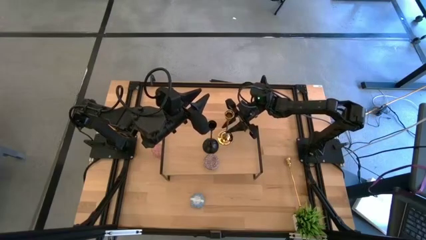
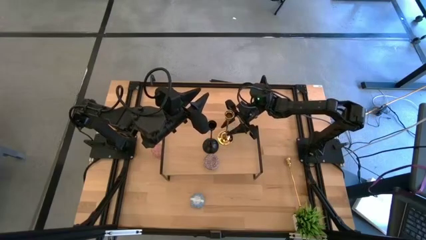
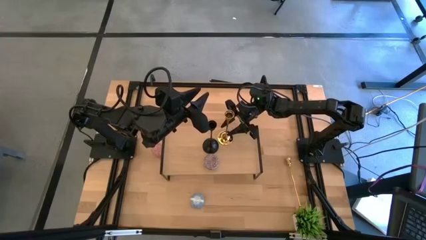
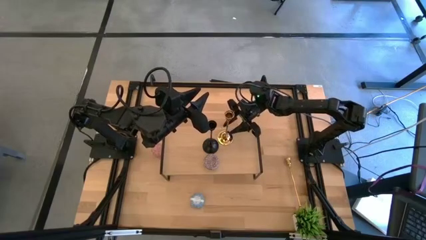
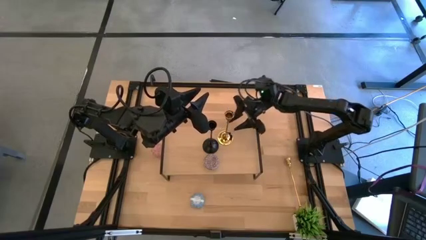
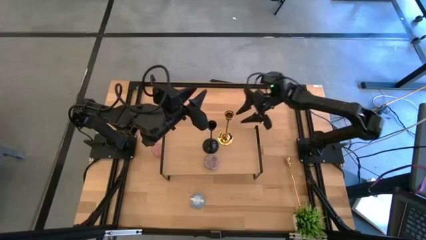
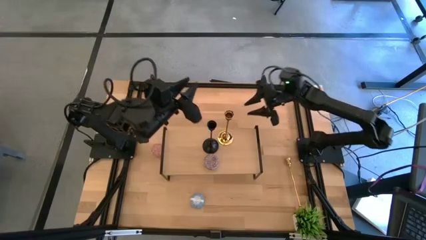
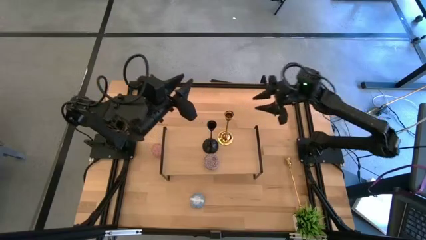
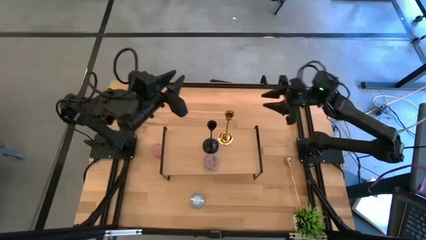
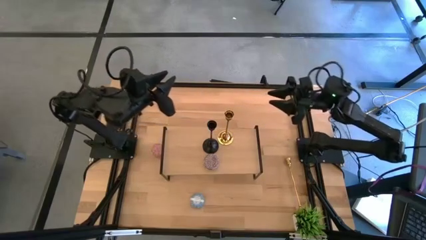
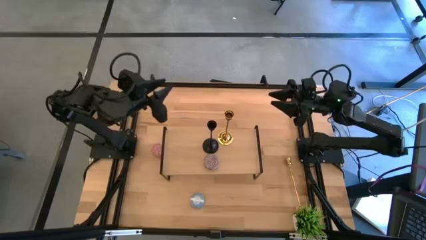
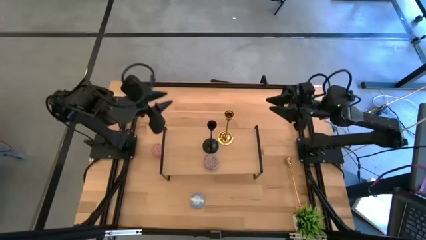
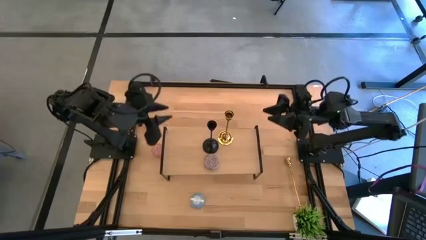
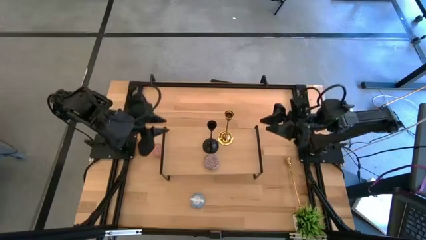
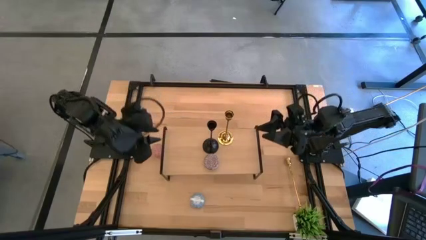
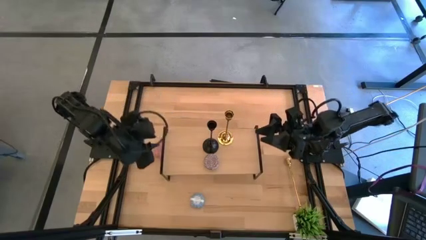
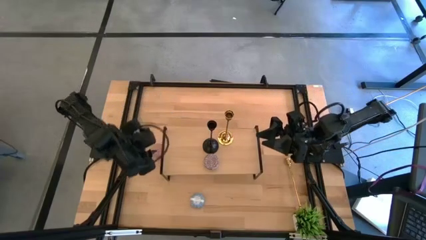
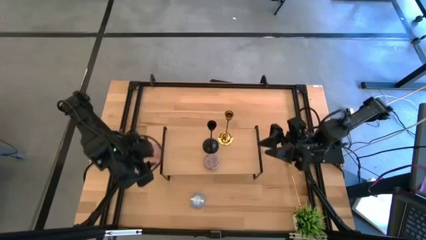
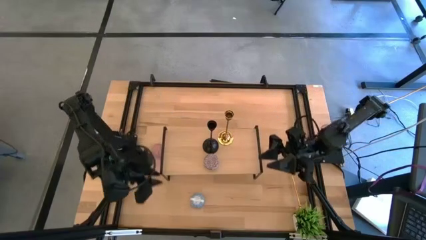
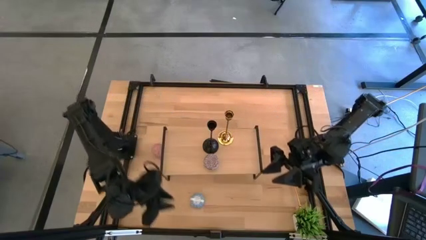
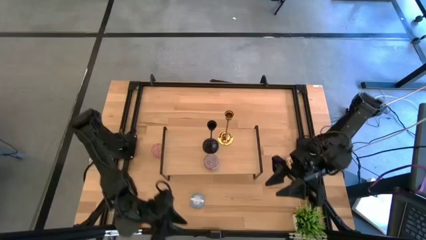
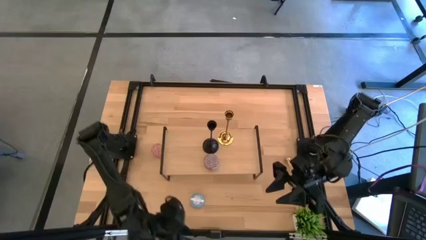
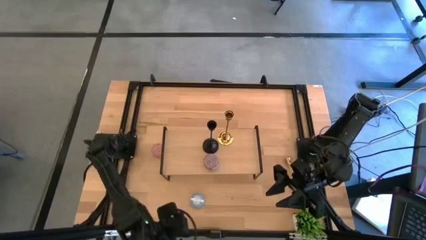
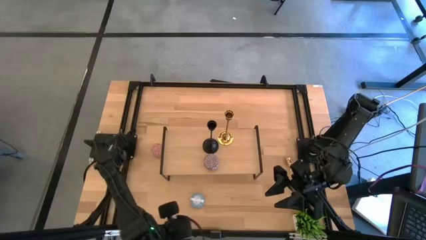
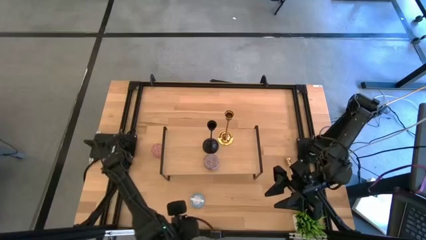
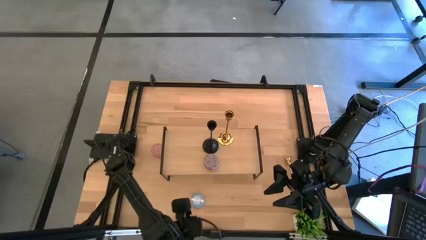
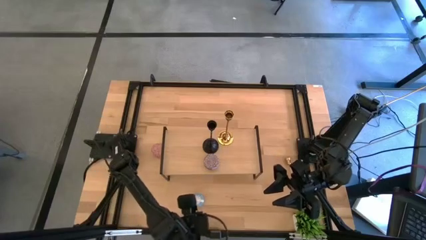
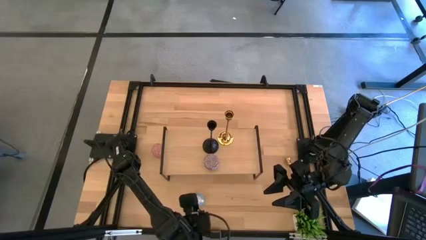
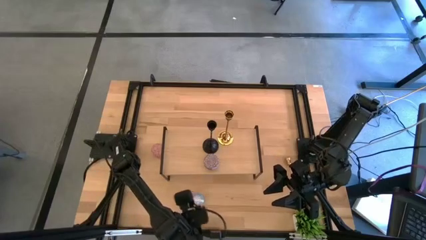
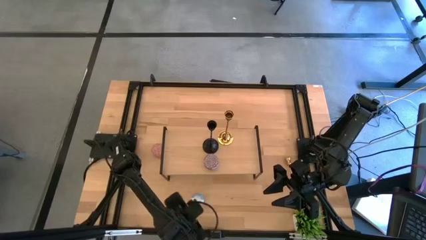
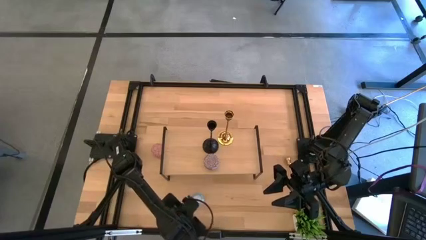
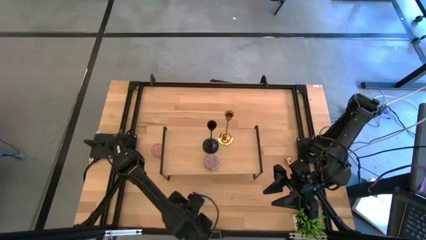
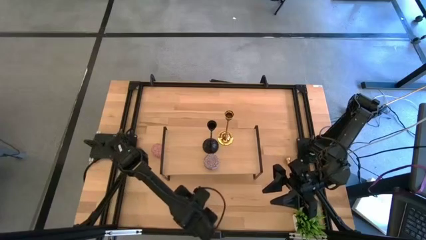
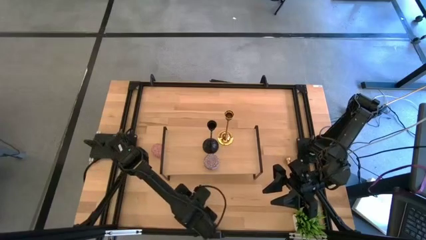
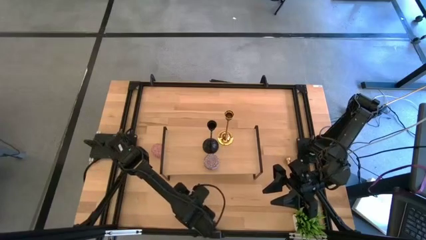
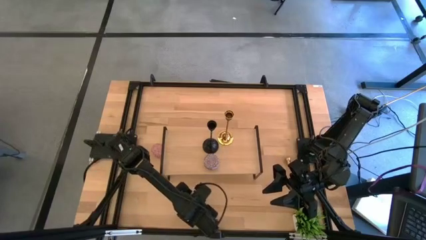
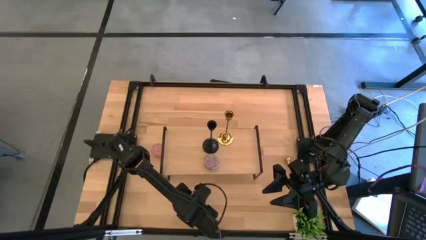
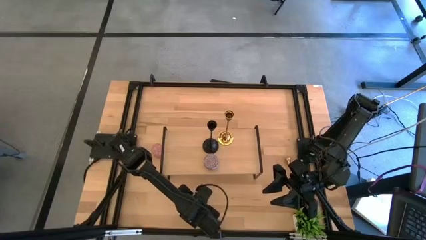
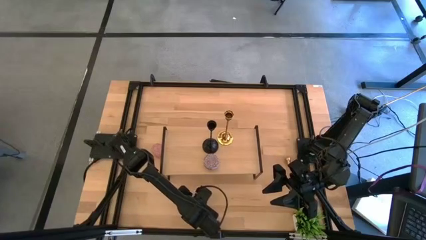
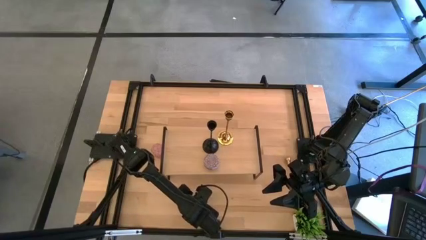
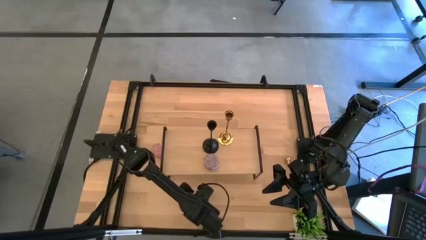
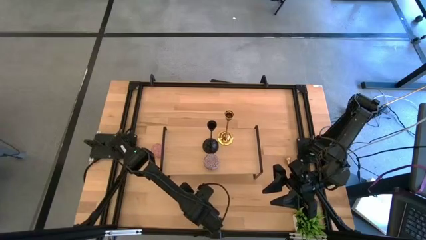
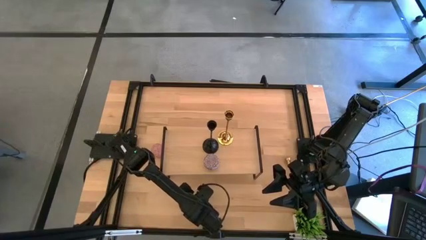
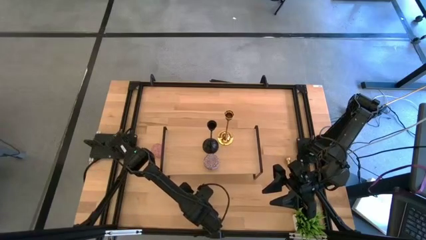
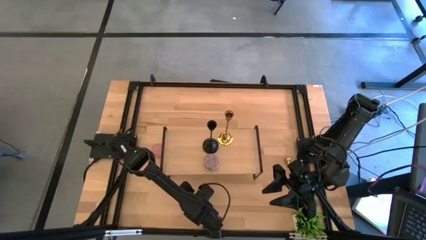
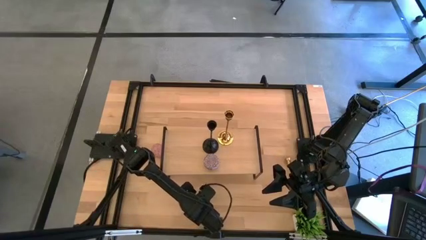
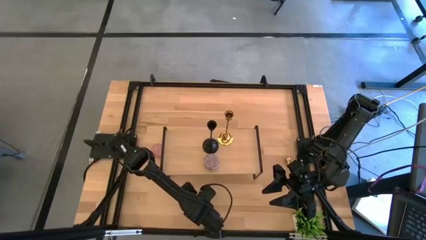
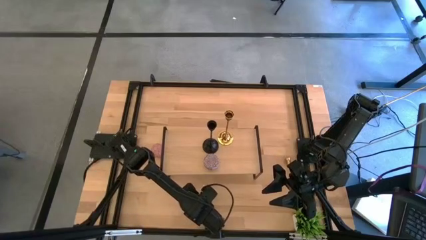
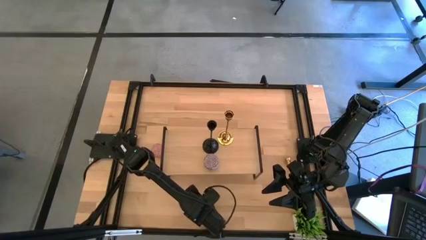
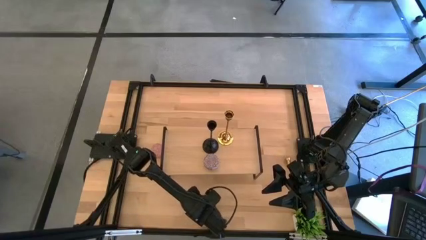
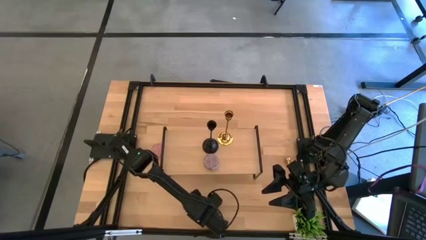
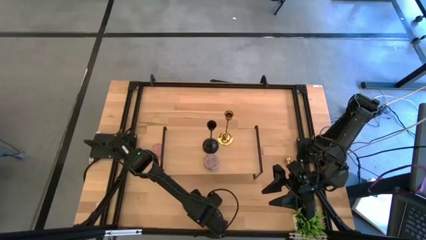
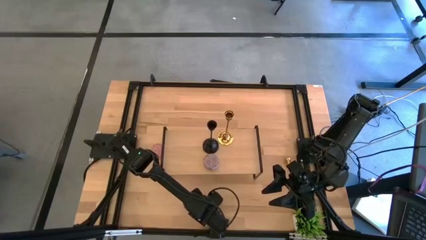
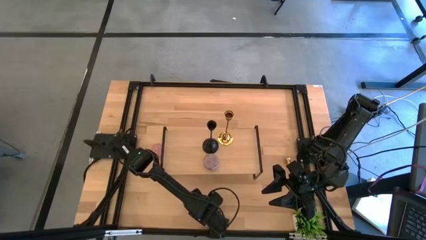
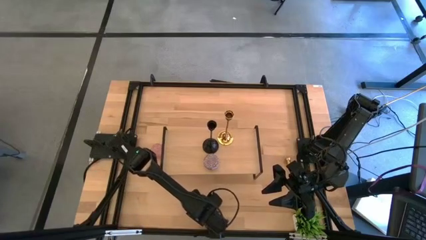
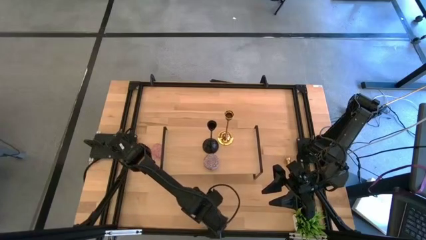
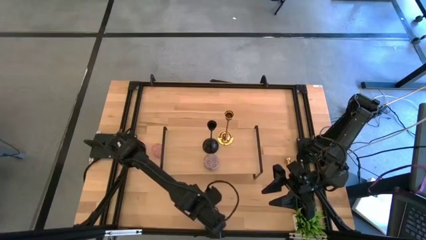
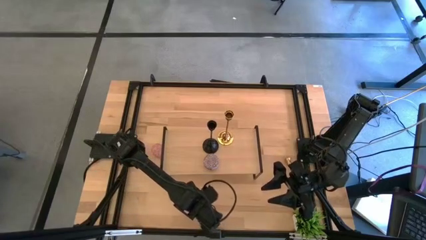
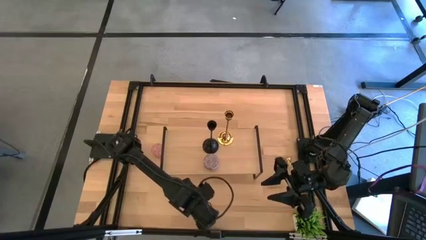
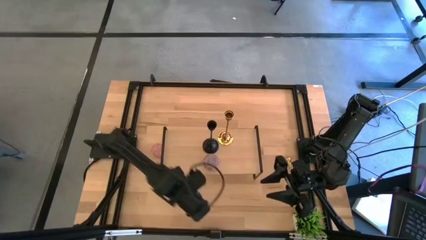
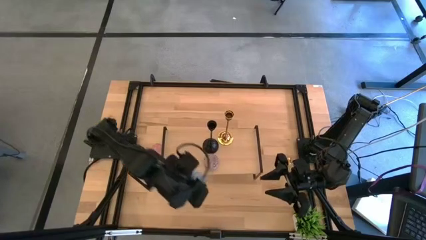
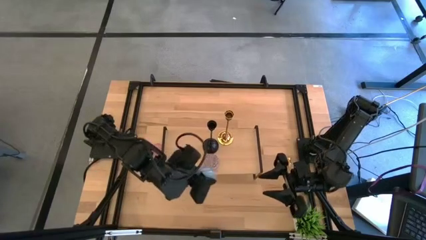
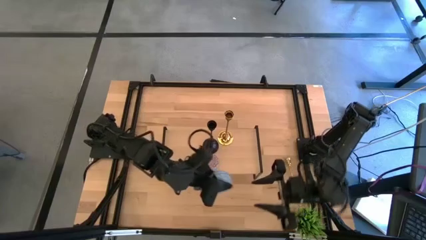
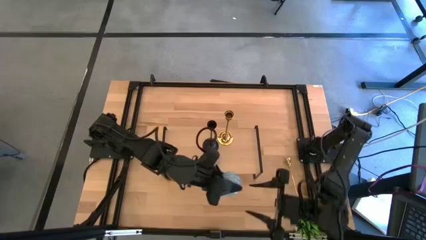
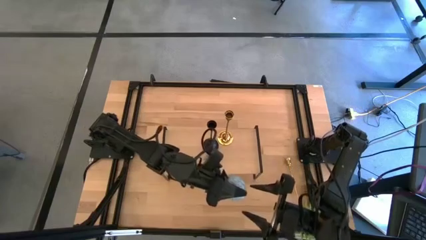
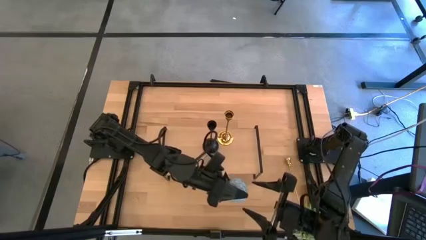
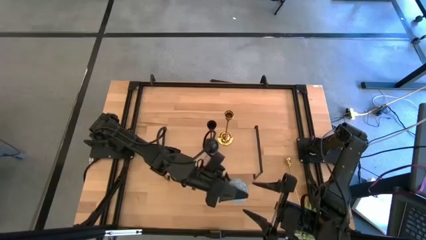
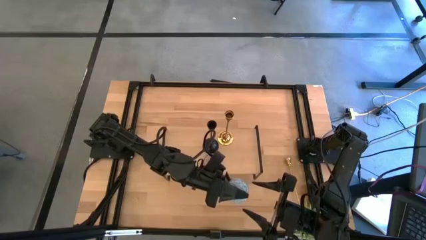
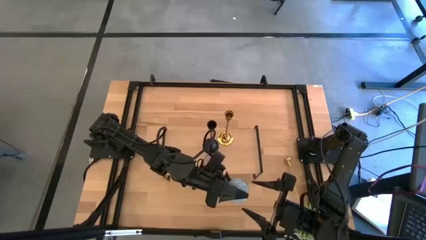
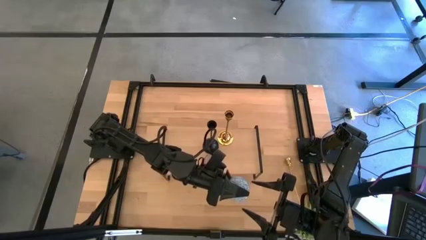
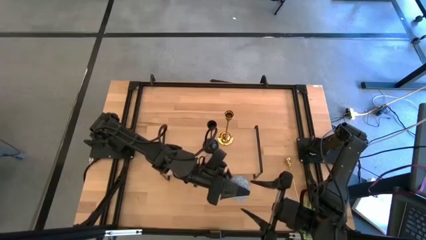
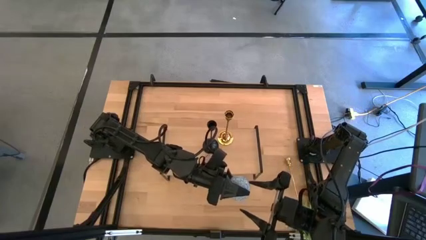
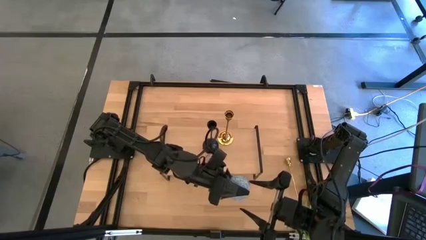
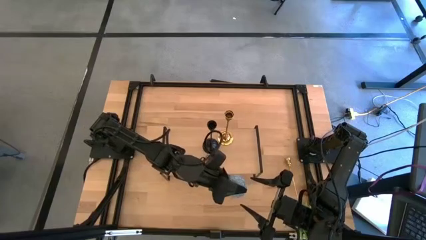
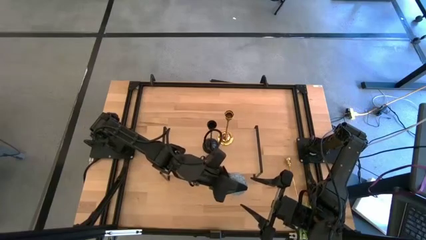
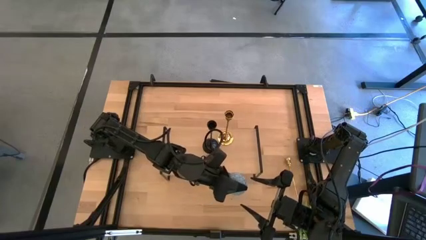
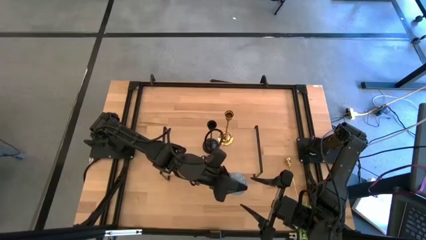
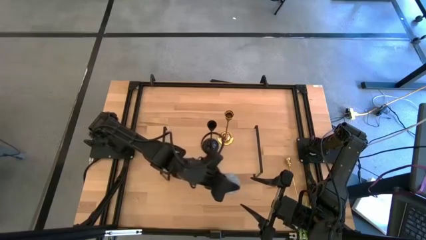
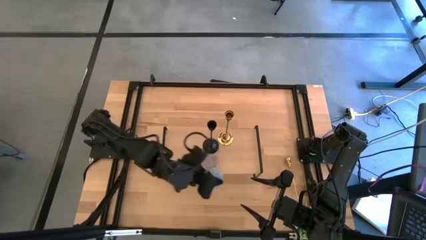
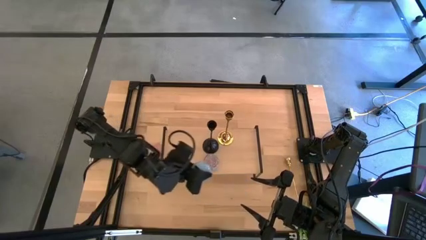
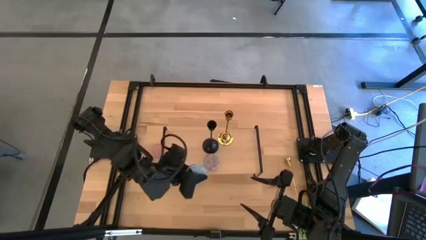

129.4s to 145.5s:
Task: Pick & Place candle stick holders
Put the blue scented candle on the shelf
